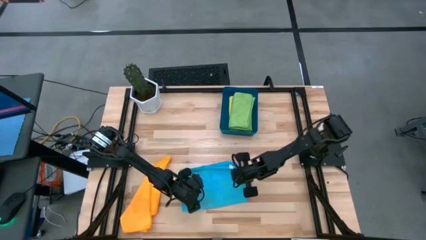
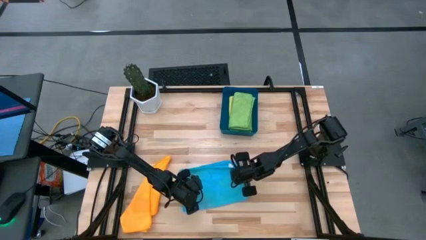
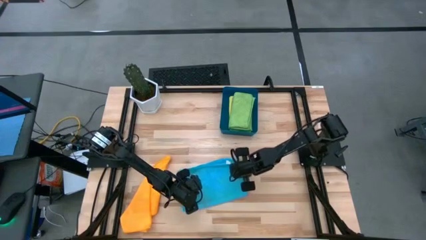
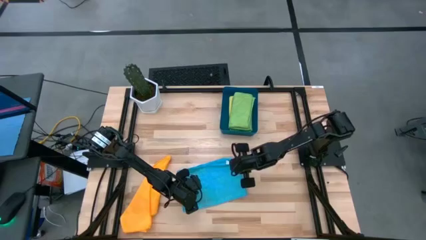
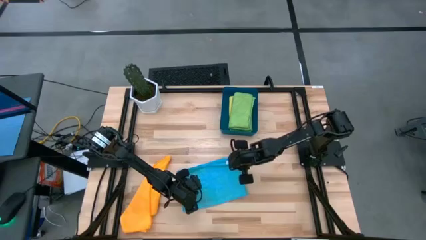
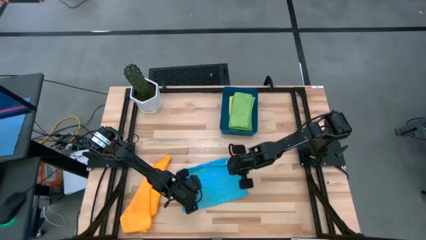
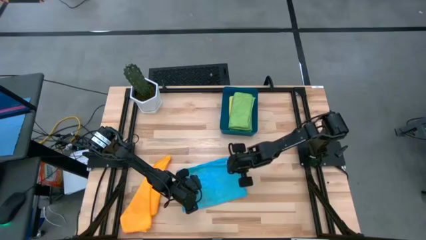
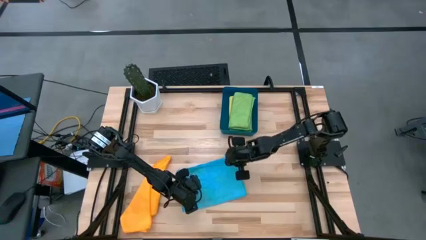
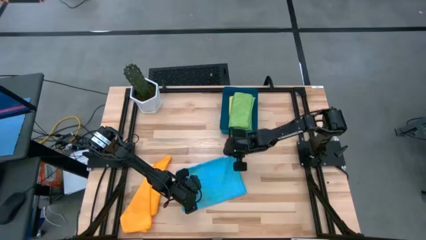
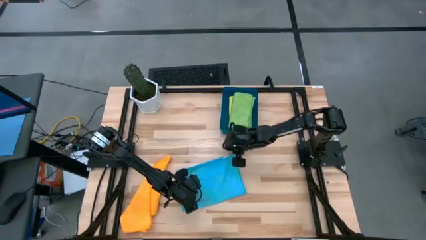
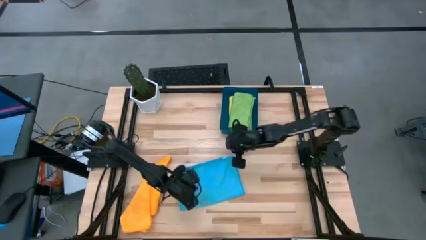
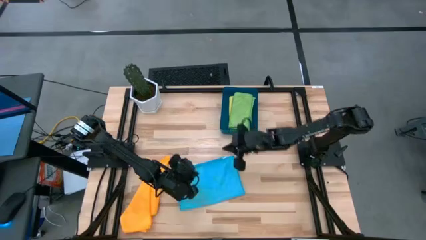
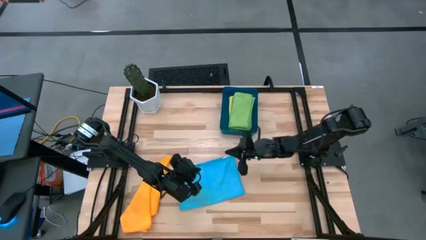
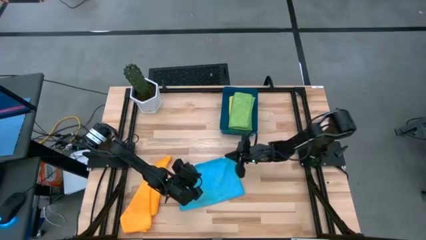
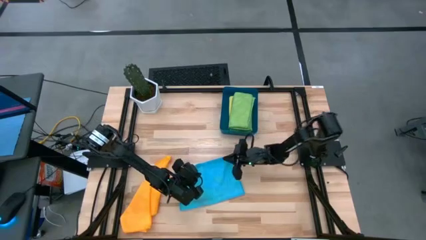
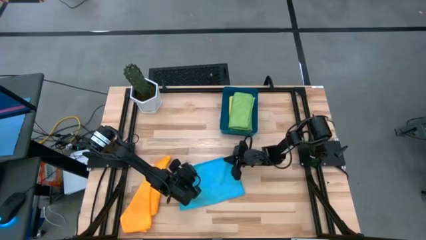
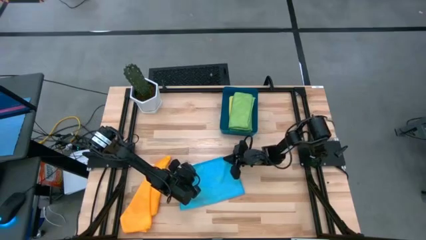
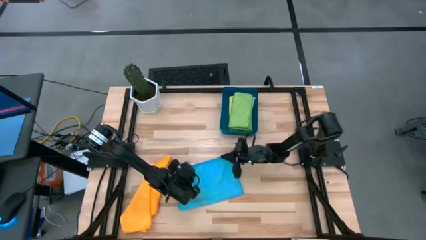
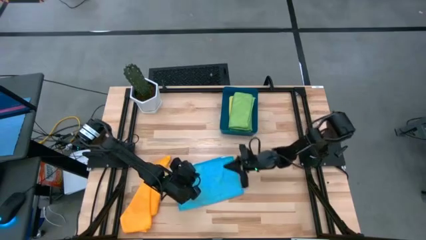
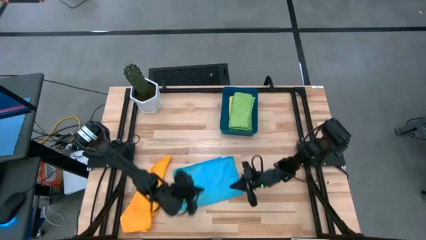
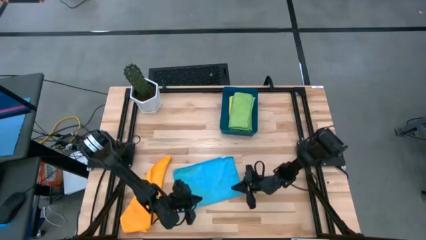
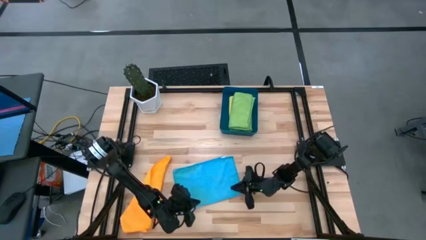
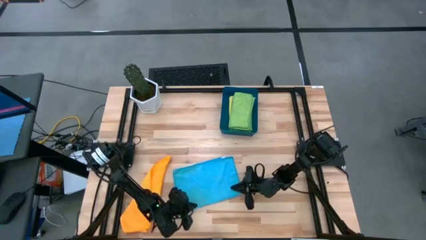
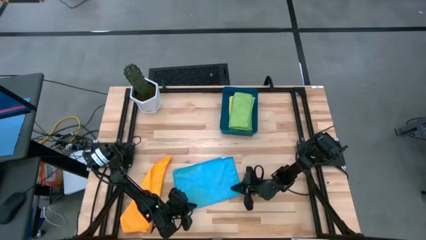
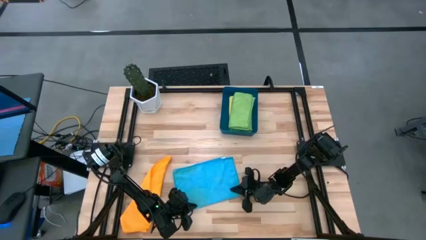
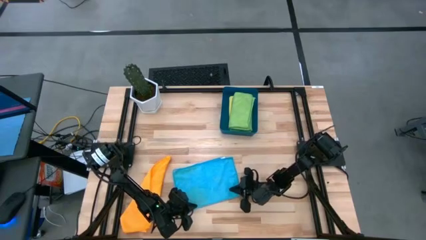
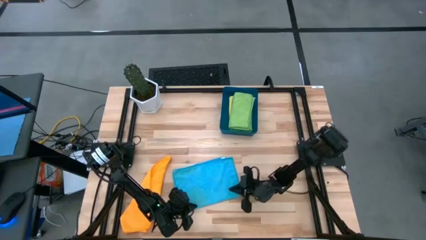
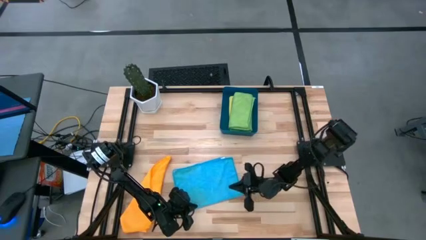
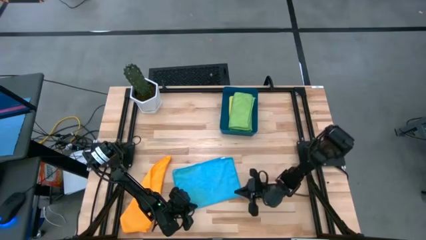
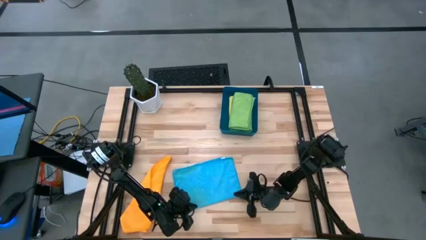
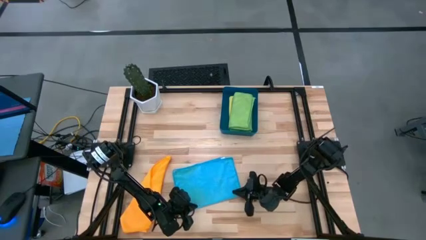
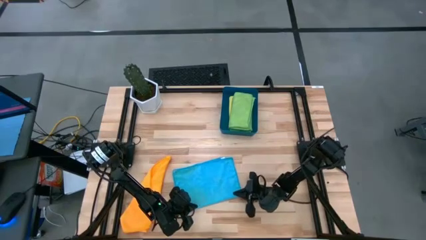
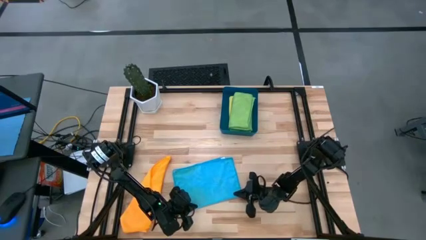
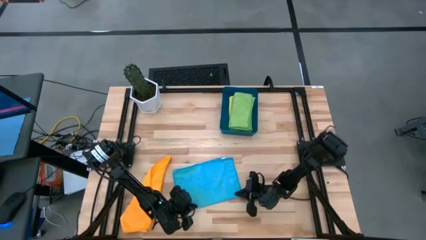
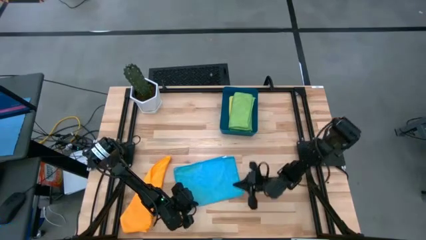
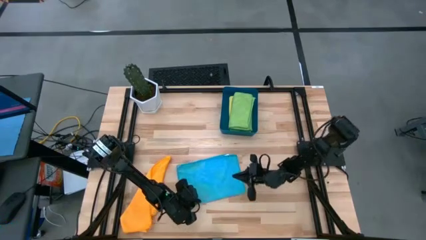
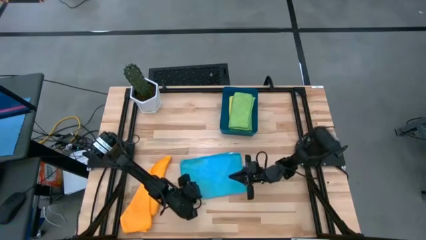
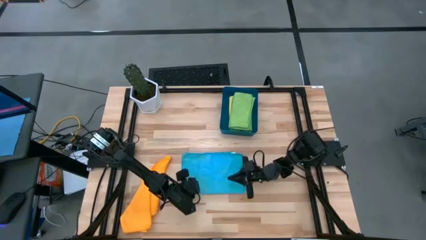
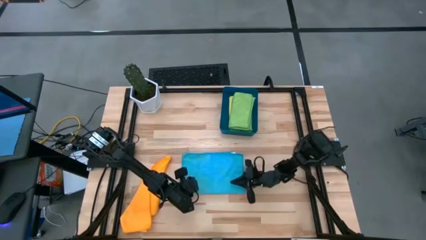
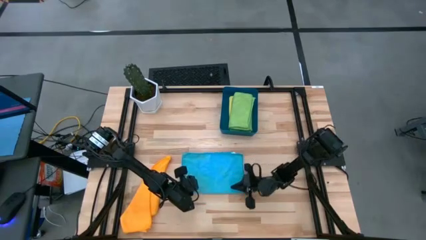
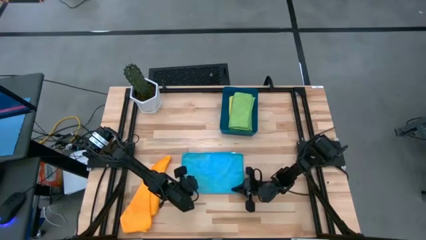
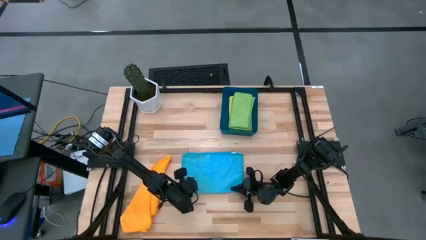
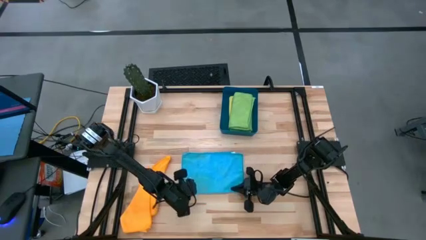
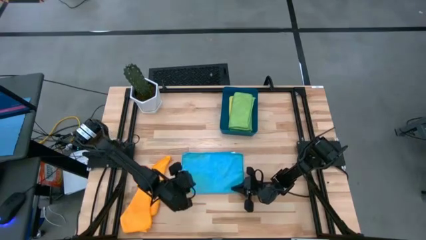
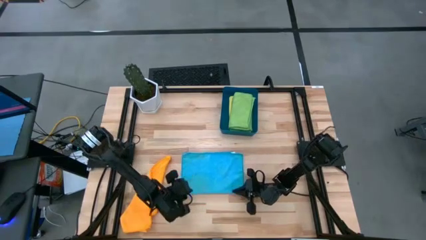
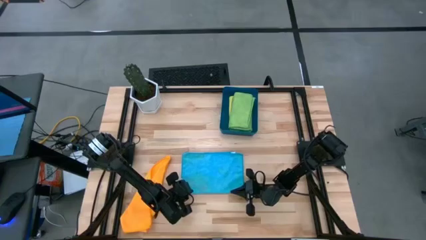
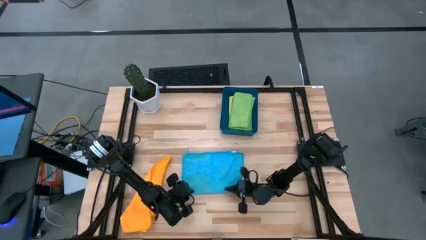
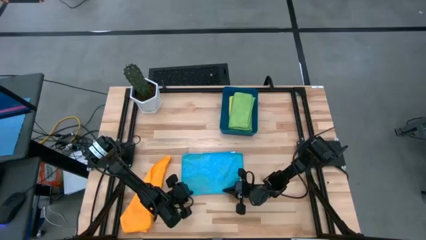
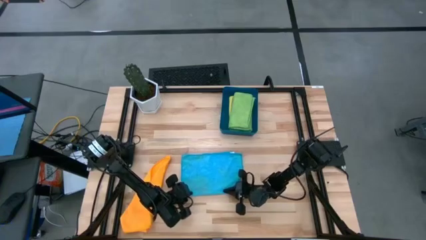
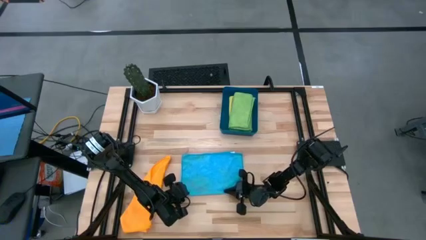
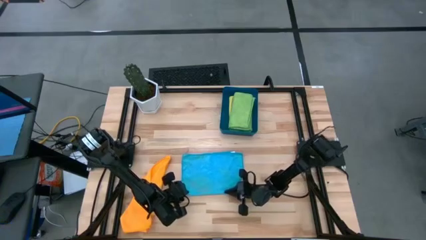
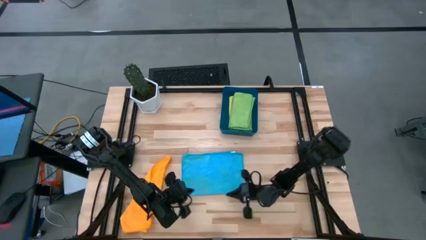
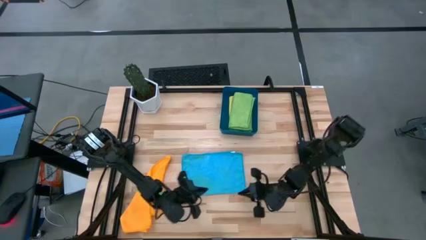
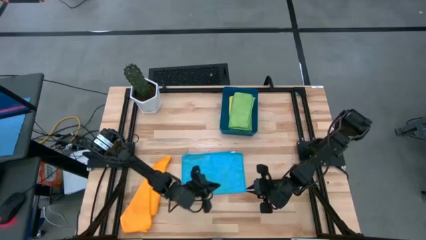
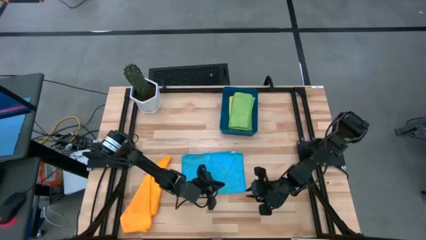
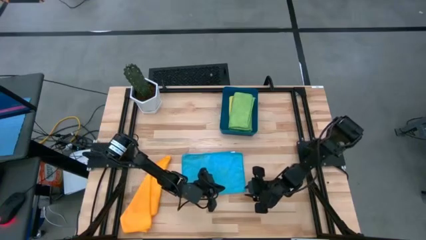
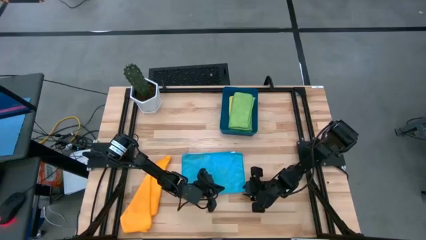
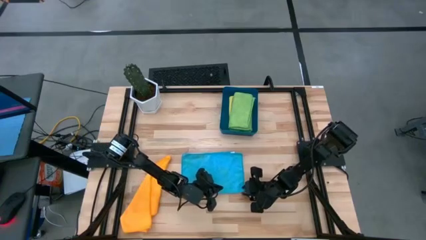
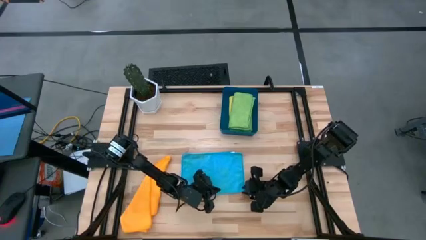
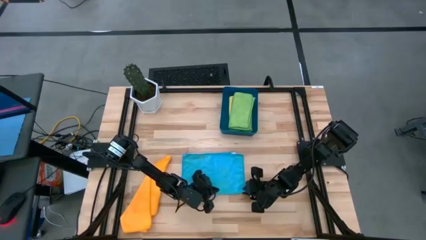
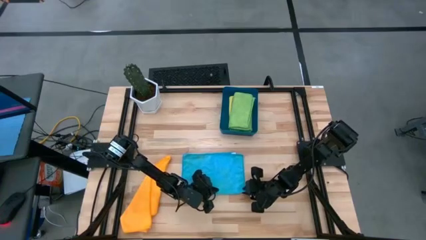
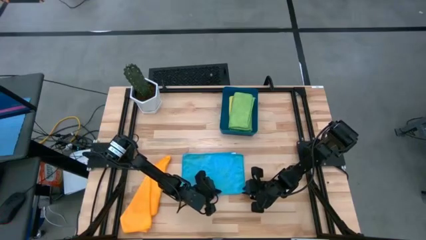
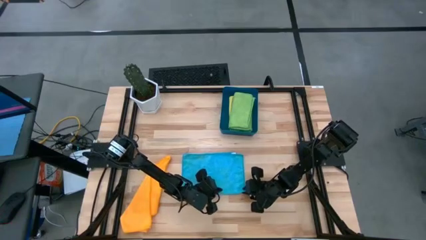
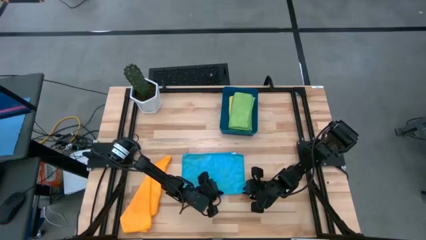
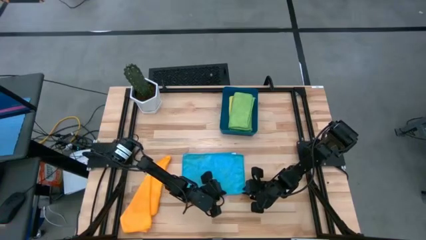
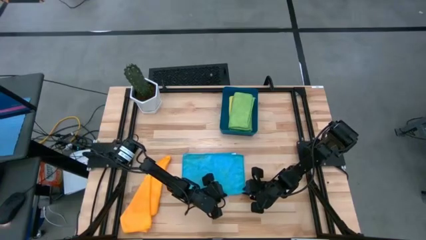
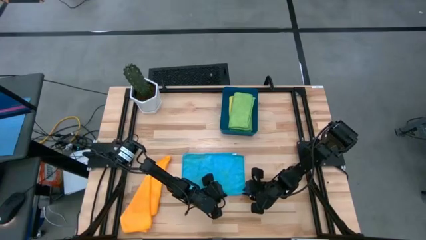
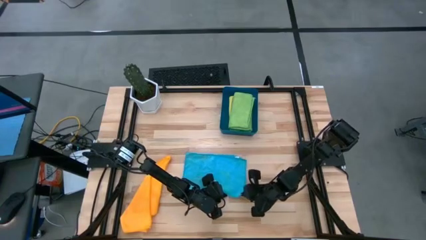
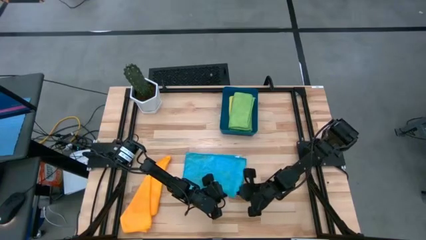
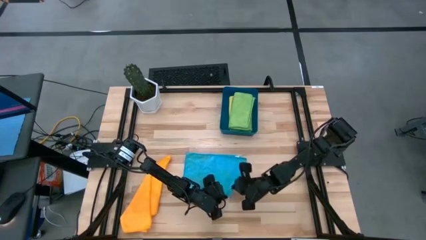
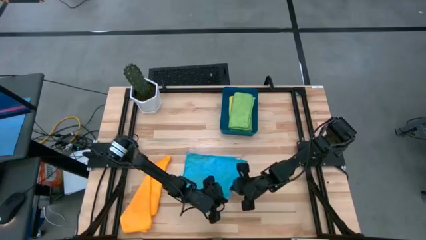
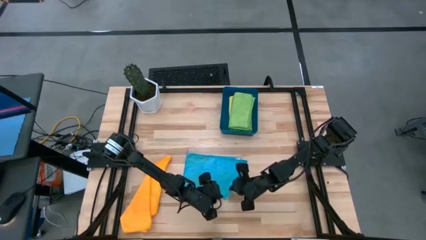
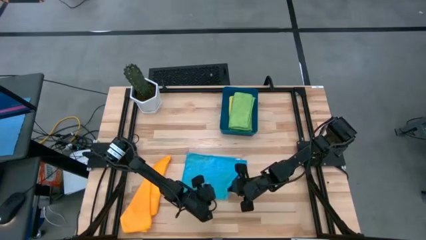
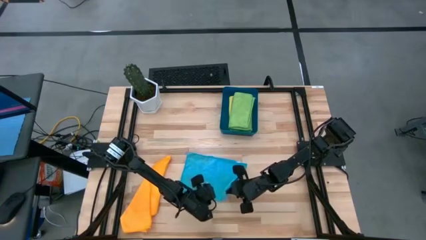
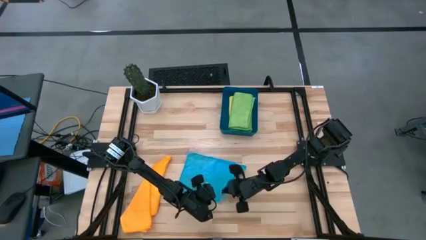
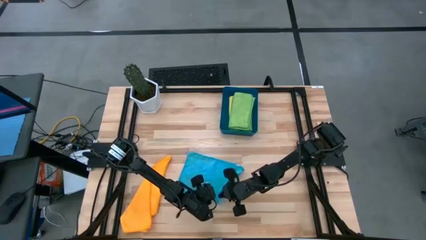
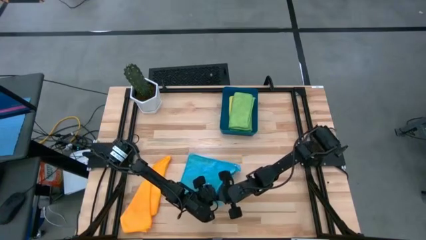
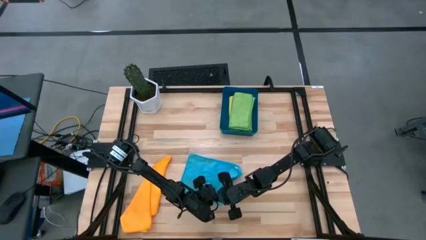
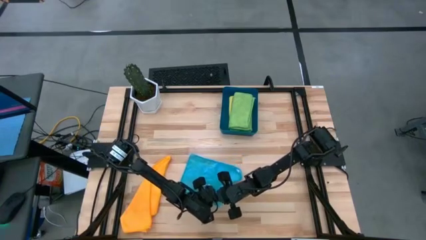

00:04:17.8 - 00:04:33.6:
Task: Fold microfiber towels
Fold the blue towel
